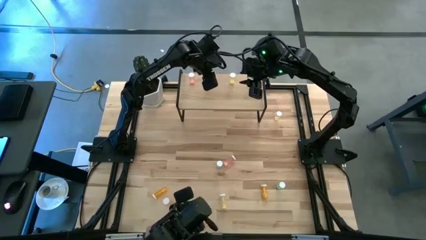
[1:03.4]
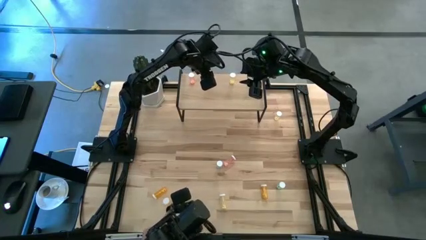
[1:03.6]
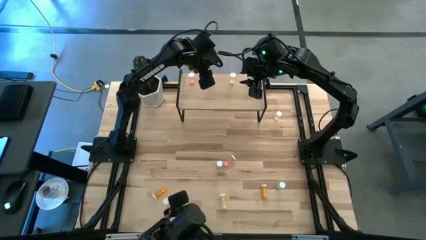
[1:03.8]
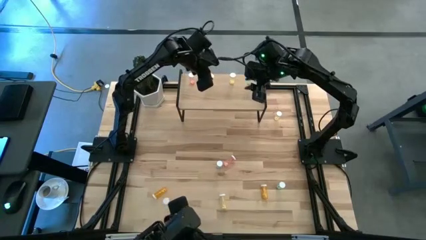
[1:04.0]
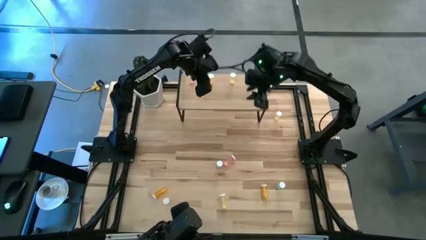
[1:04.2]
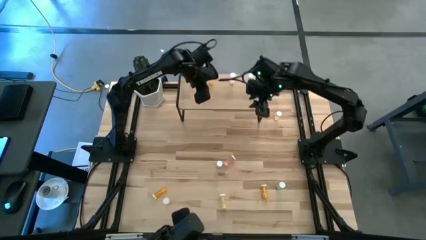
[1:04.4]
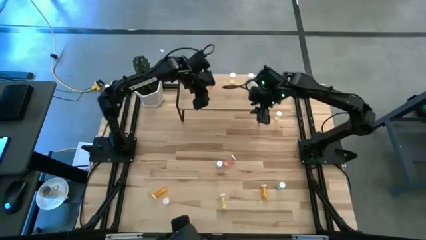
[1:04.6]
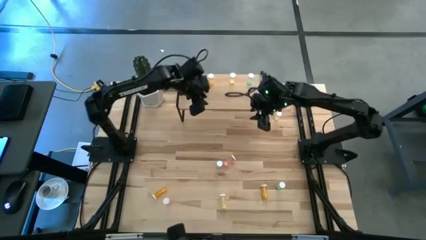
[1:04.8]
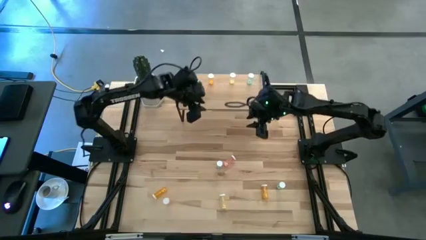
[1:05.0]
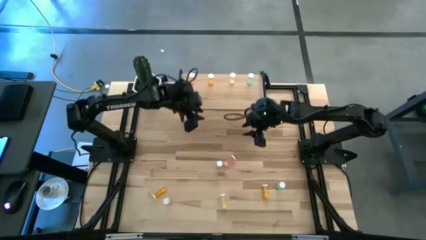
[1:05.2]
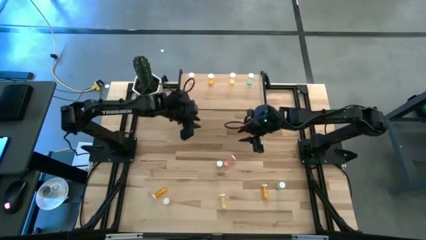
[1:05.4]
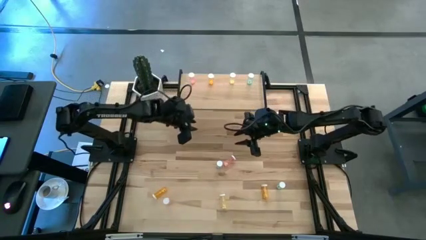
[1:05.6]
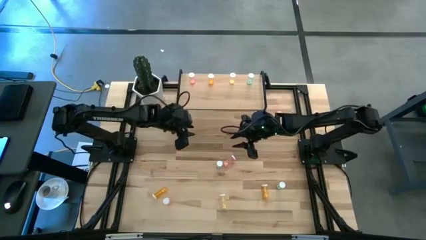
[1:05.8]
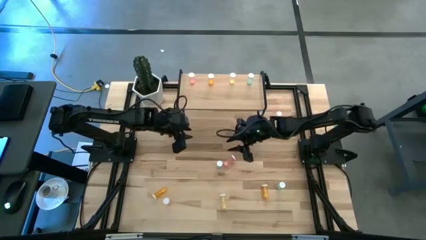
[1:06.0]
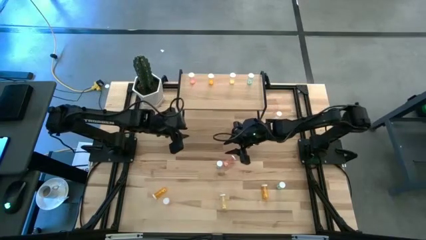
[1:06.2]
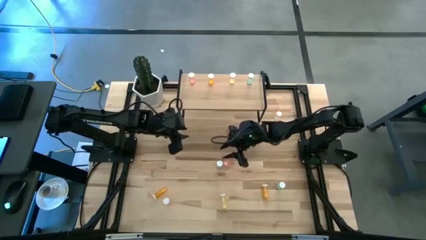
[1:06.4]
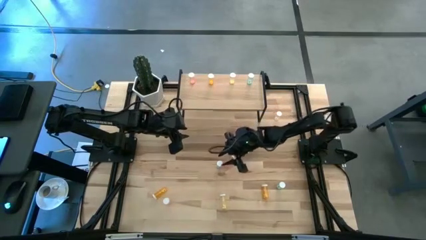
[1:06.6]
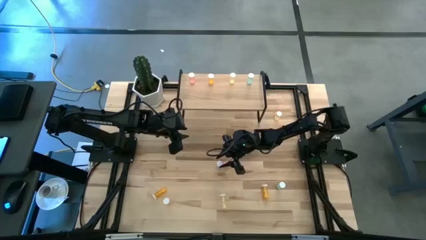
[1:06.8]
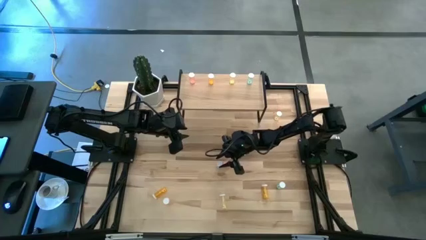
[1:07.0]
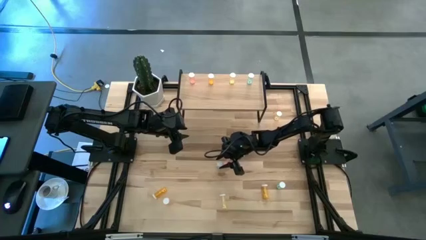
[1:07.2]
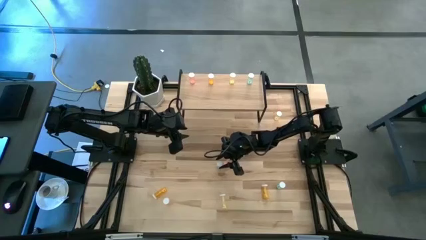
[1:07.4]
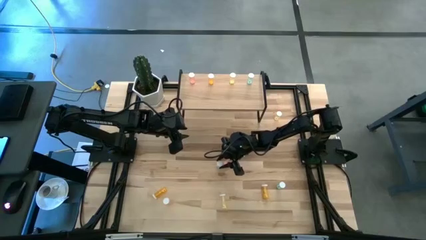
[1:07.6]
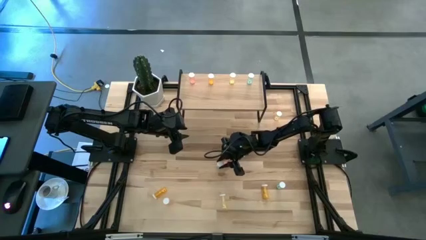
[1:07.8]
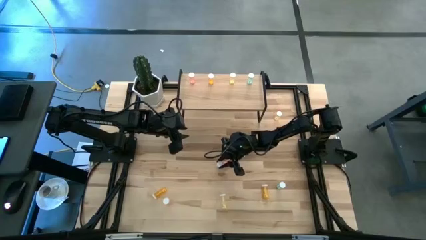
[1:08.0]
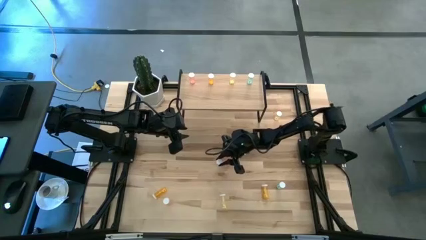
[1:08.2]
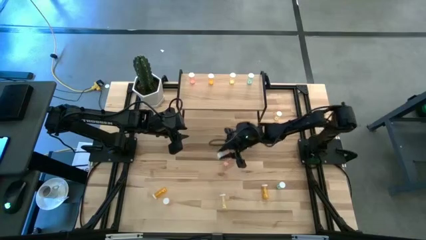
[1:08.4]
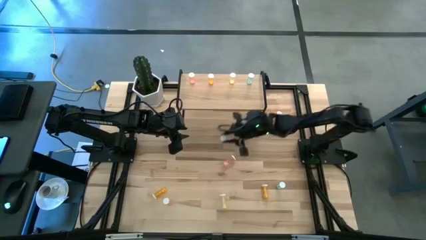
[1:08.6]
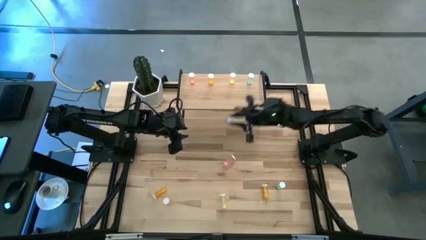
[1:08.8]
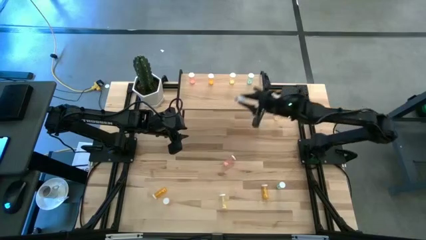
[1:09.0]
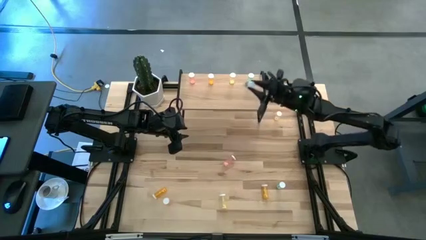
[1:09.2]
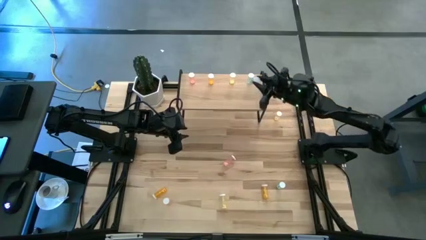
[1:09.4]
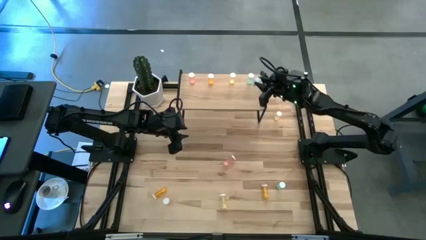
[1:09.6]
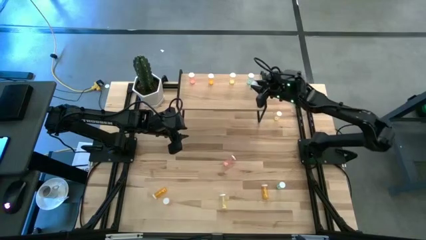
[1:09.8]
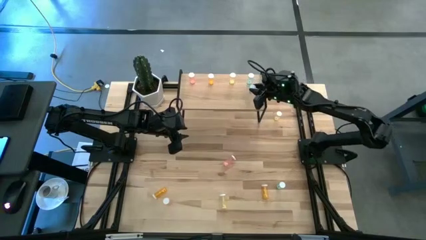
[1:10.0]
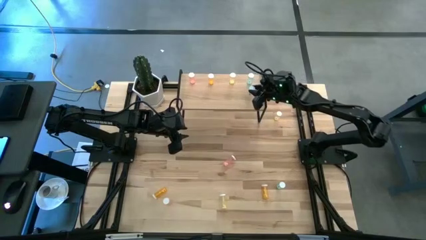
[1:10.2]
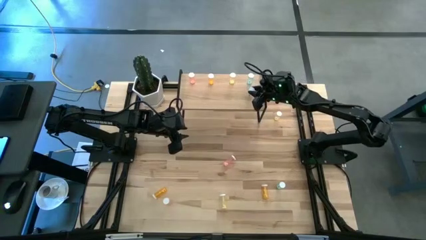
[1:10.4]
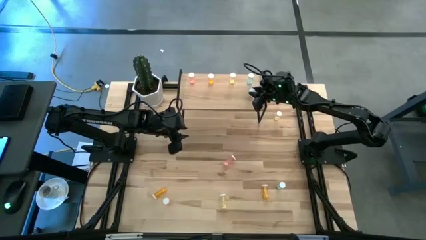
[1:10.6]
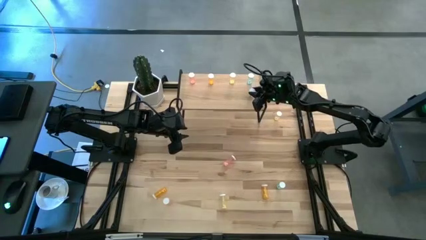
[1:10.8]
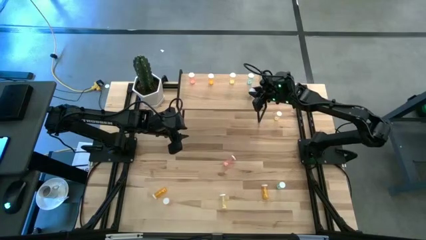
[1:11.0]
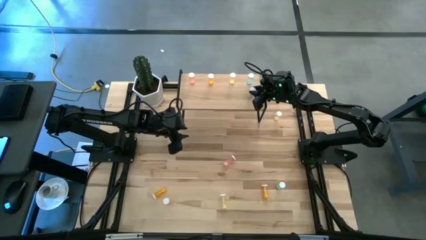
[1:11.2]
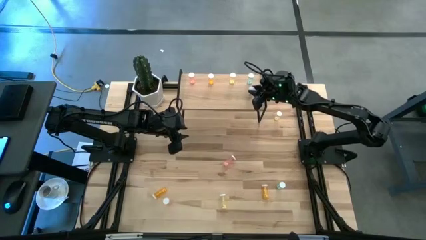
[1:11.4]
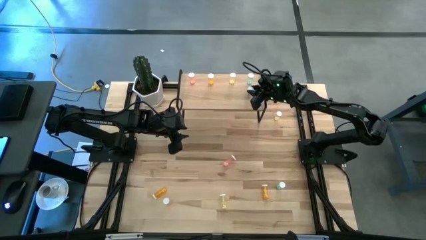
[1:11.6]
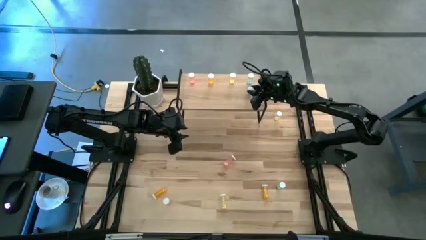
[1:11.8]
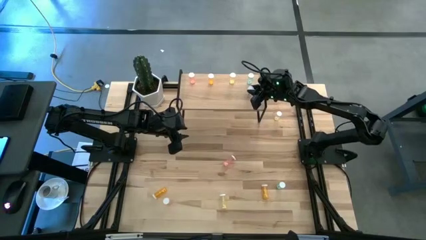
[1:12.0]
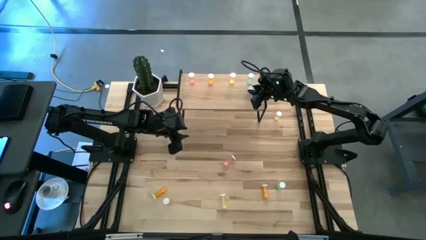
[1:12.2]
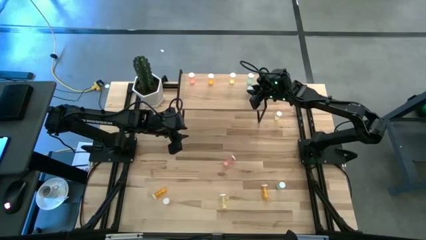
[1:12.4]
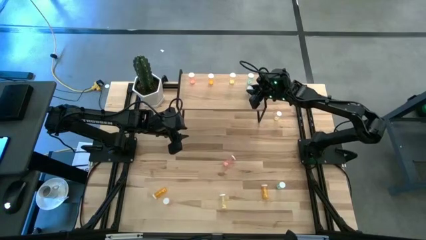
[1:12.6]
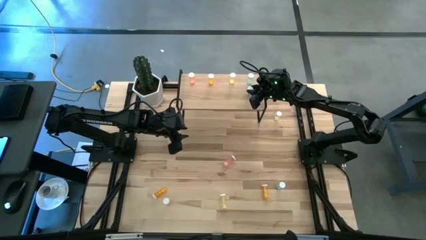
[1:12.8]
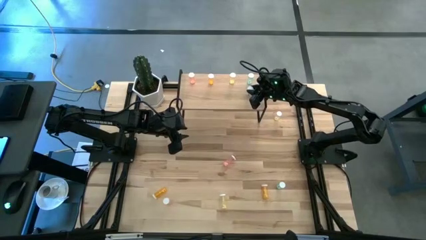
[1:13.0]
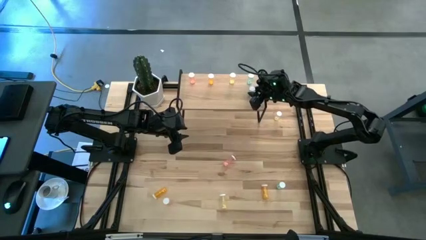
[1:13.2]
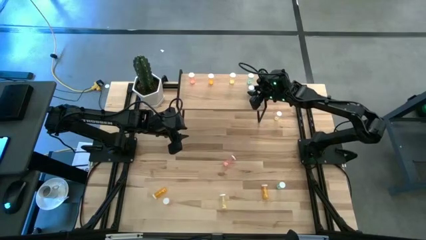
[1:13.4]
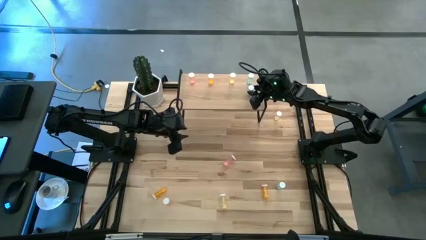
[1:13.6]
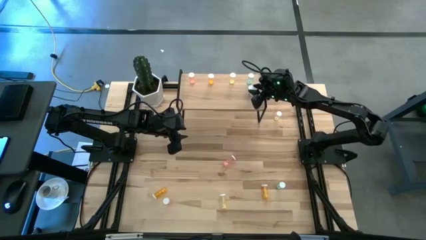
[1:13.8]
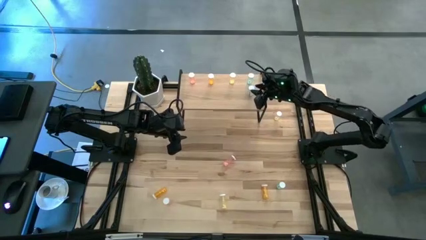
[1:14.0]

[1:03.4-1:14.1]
Task: Pick and place medicine bottles onto shelf by color
Put the top blue pill bottle aligned with the other blue pill bottle on the shelf

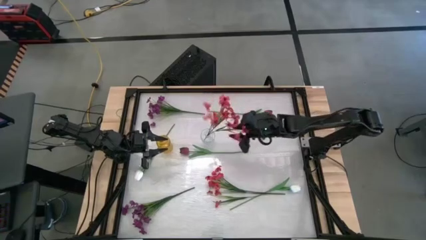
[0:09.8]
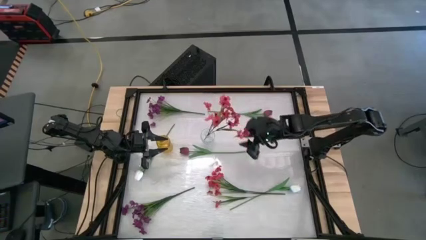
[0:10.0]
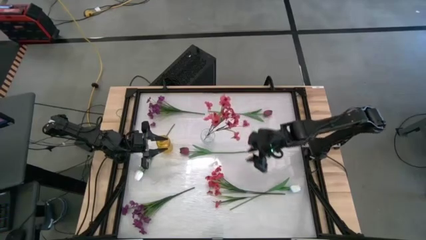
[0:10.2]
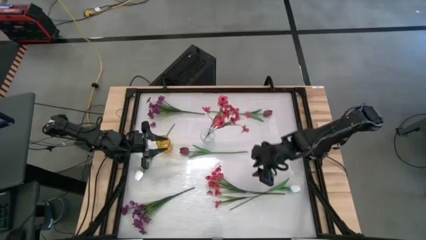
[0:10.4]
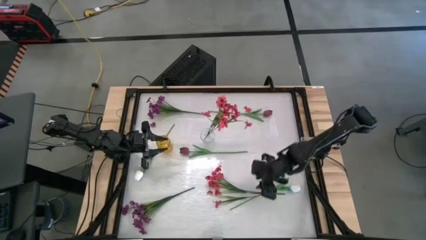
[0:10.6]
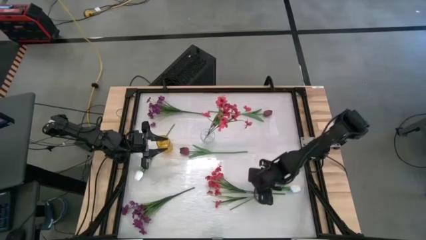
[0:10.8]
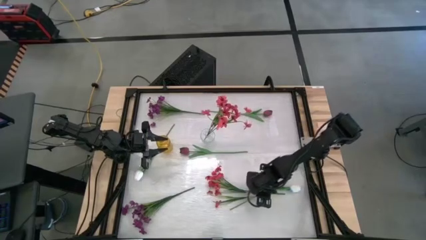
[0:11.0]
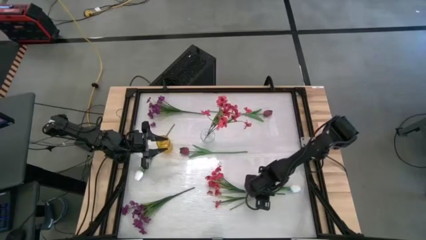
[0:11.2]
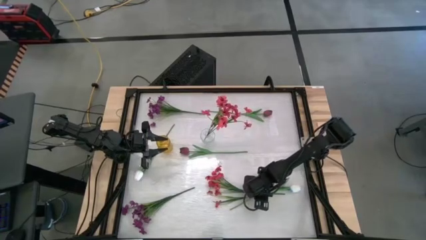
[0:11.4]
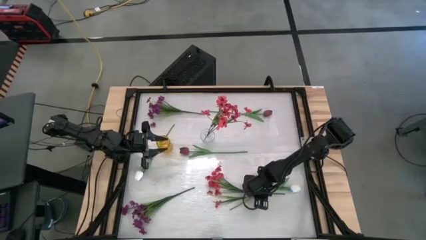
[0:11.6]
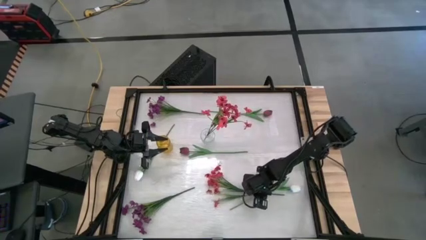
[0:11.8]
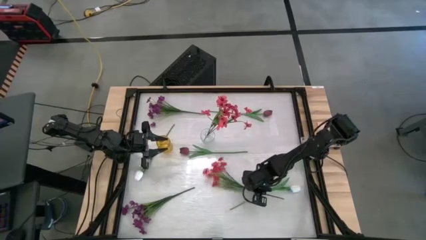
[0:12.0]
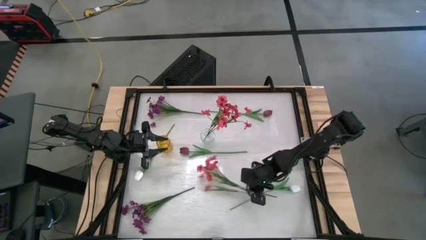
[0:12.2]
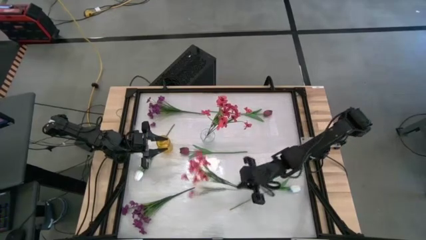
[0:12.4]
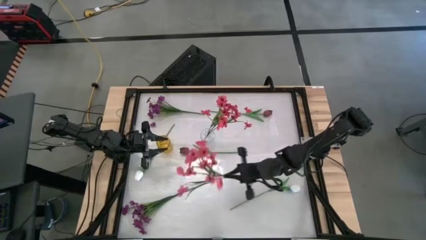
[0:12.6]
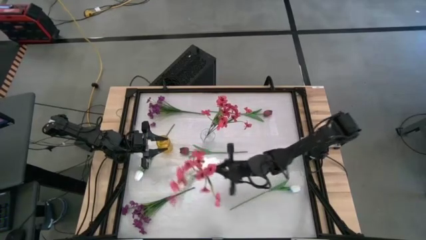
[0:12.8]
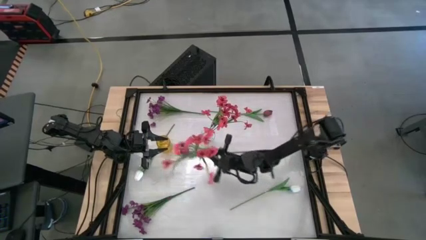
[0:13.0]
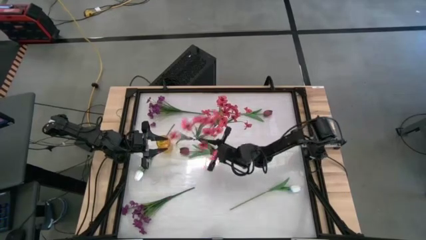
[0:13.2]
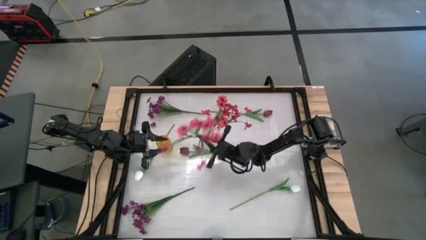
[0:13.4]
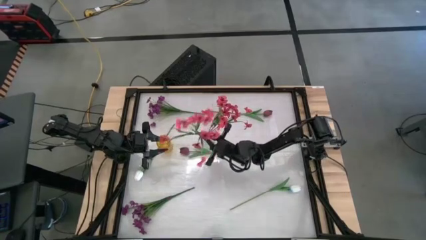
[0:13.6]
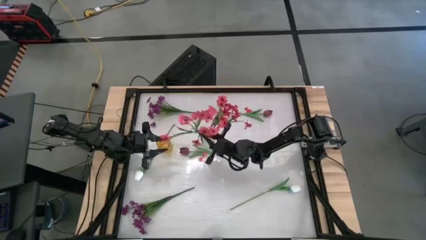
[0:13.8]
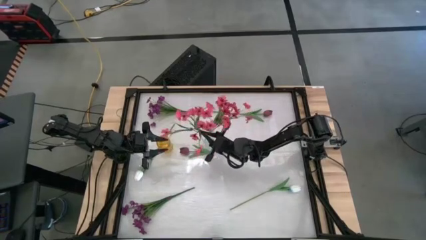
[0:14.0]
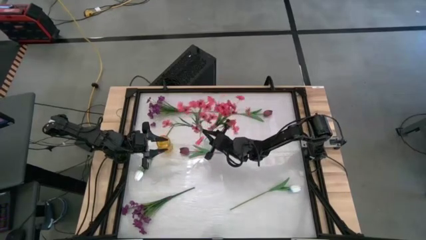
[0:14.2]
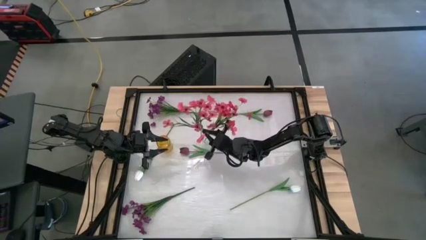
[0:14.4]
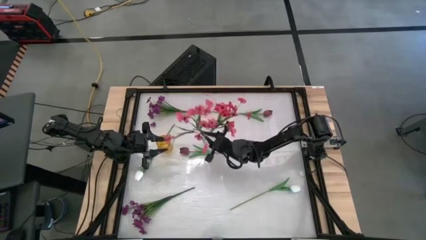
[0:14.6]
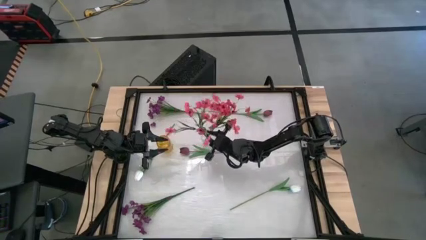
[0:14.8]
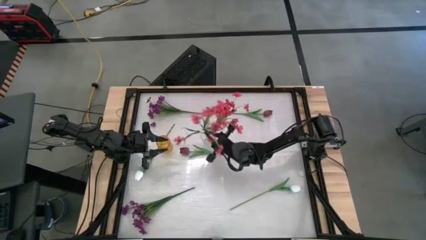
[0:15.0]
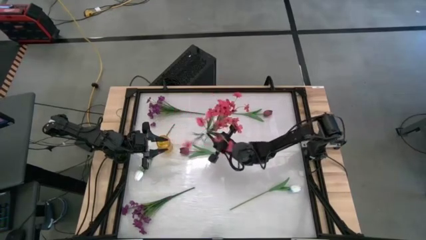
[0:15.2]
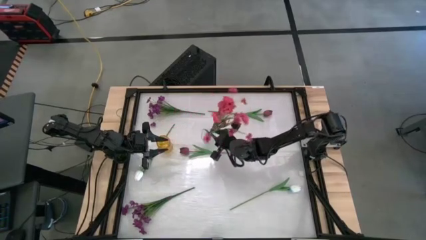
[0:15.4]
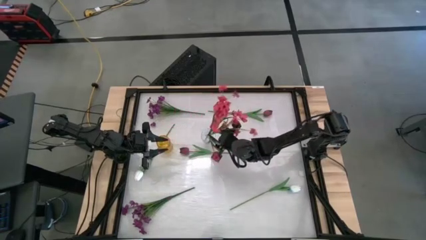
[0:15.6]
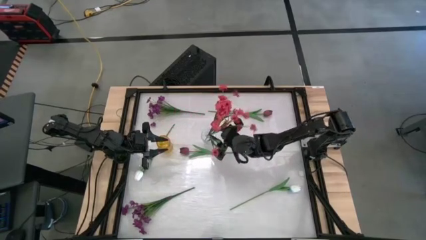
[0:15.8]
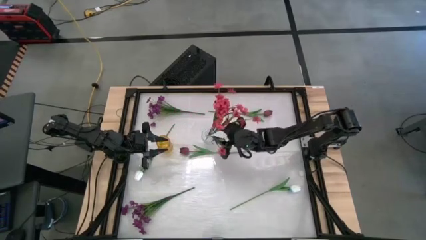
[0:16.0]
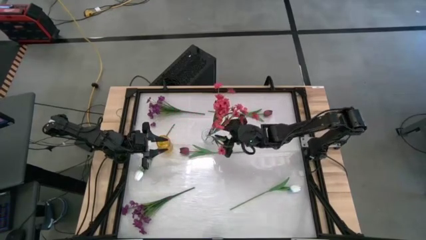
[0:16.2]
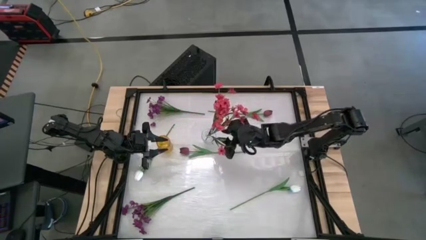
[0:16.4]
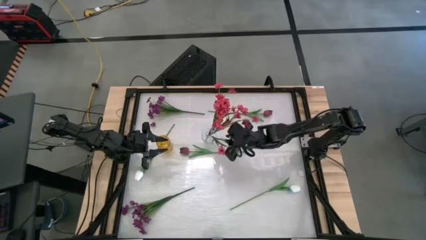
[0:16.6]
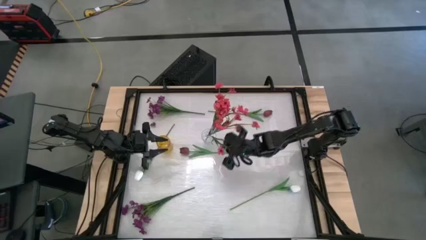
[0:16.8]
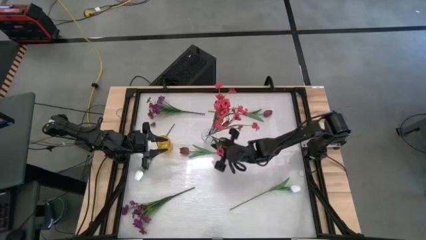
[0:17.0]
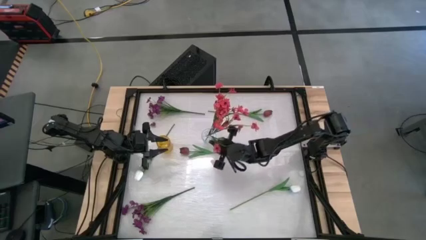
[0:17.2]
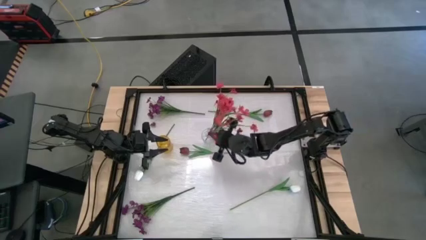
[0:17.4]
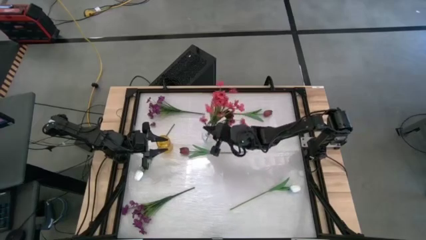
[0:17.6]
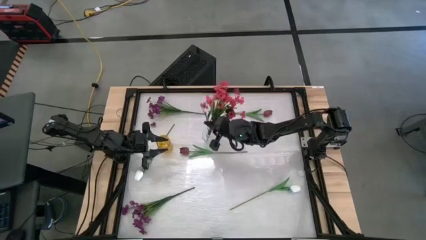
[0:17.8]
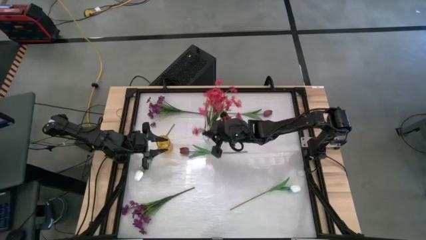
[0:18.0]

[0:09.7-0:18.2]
Task: Sort flowers into vase by color
Put the red flower into the transparent vase
